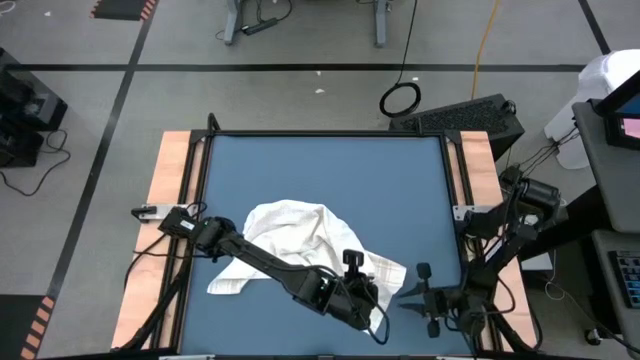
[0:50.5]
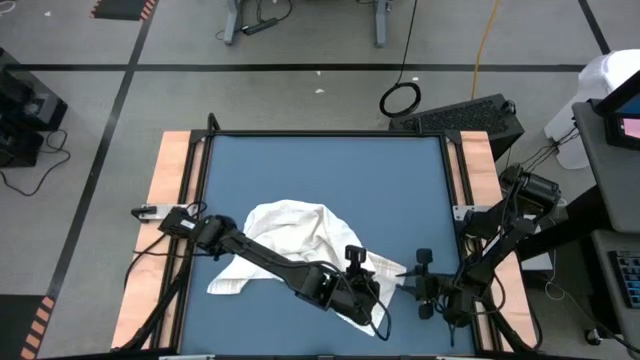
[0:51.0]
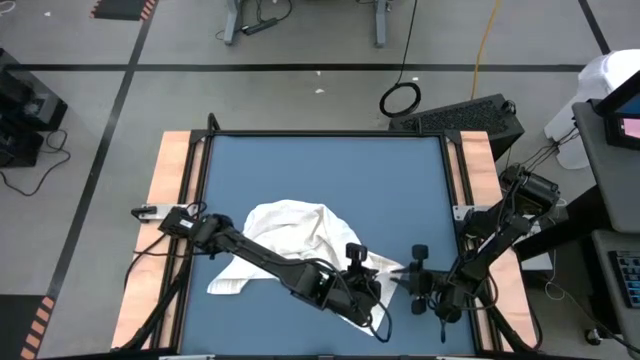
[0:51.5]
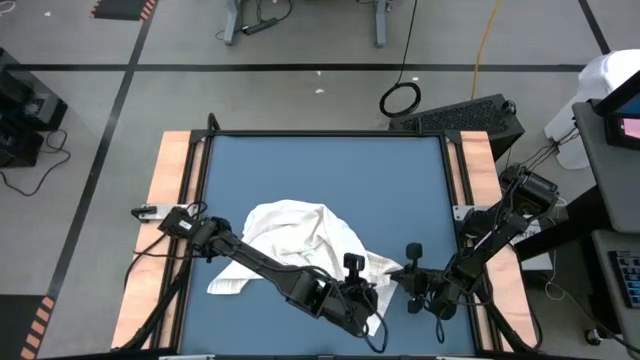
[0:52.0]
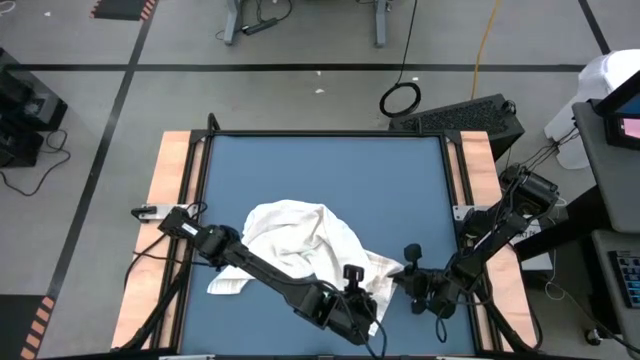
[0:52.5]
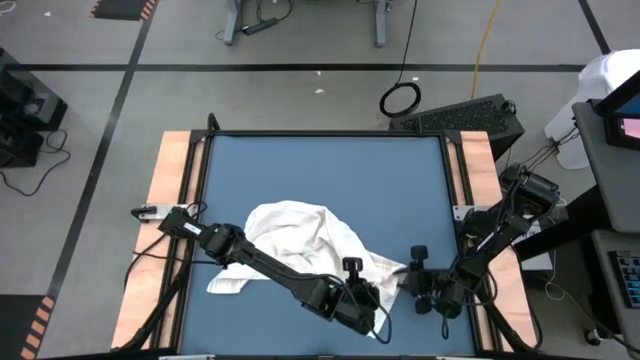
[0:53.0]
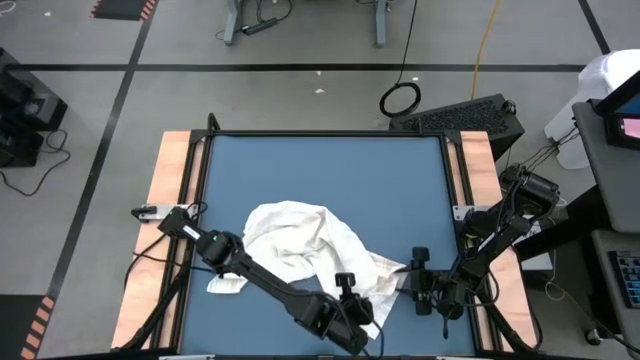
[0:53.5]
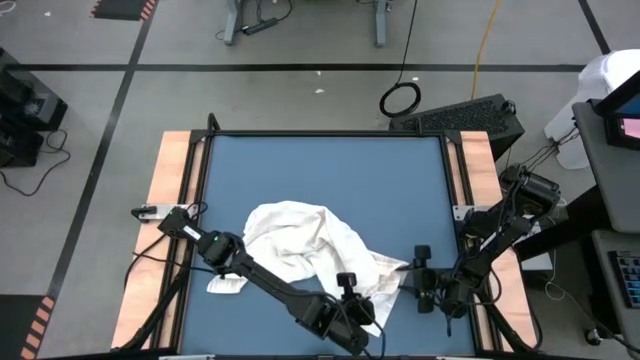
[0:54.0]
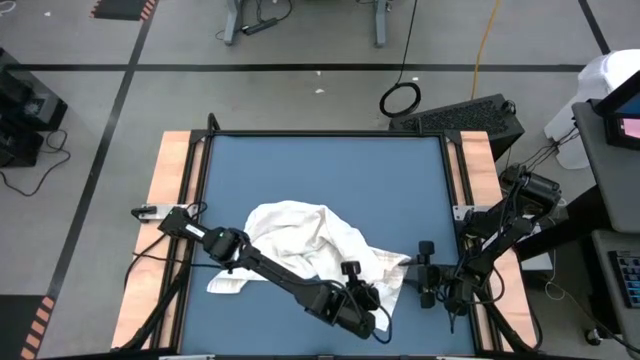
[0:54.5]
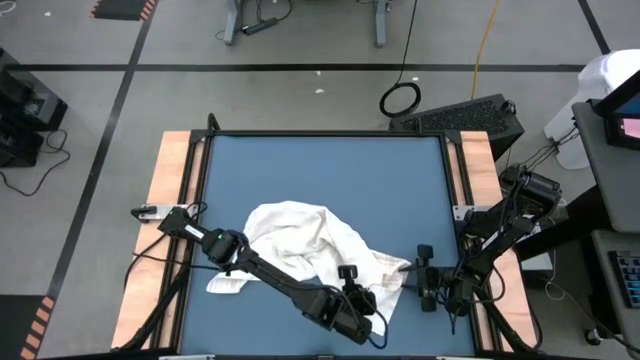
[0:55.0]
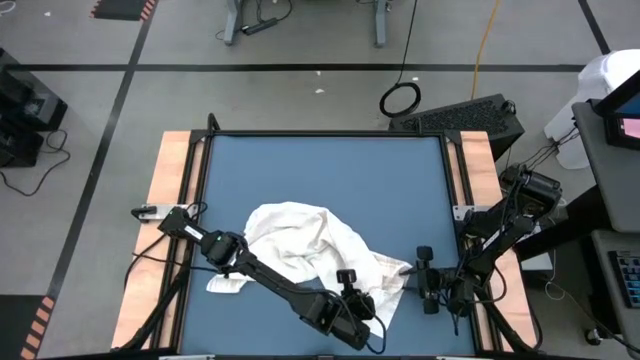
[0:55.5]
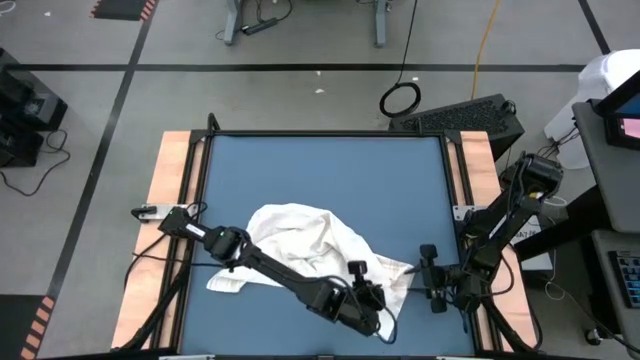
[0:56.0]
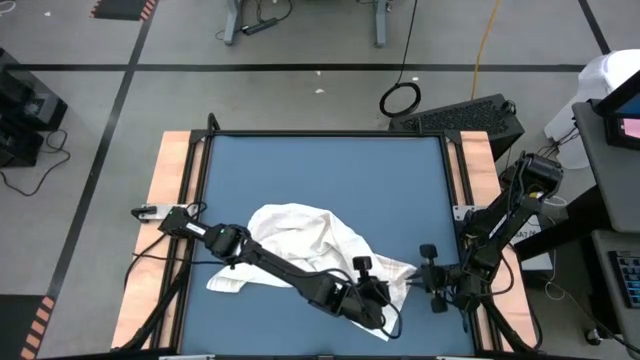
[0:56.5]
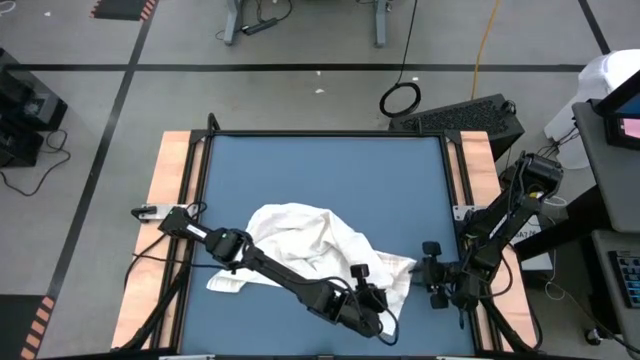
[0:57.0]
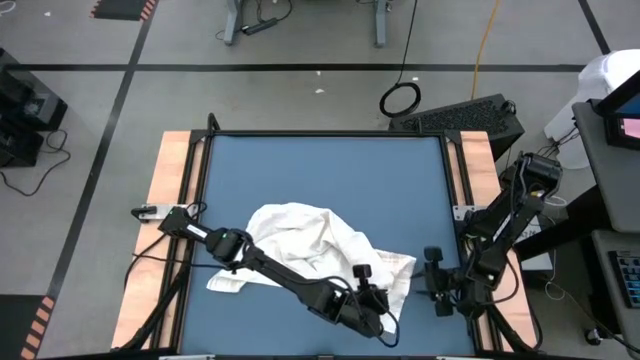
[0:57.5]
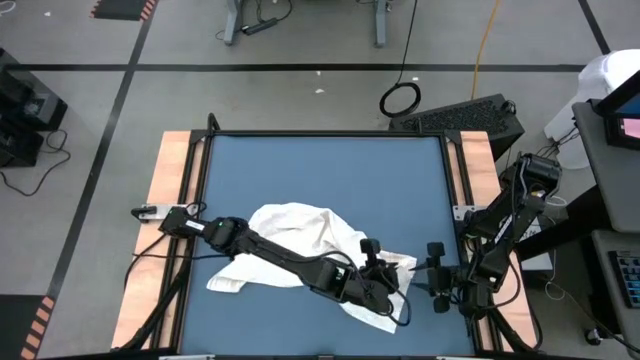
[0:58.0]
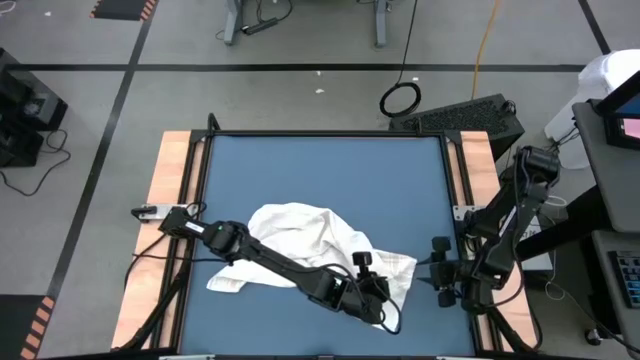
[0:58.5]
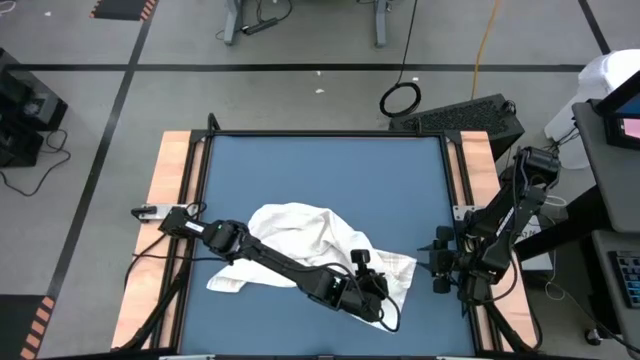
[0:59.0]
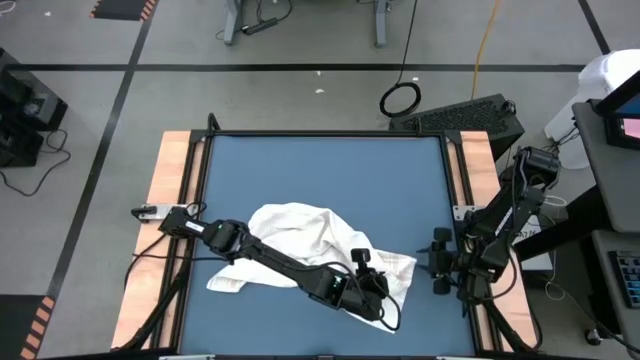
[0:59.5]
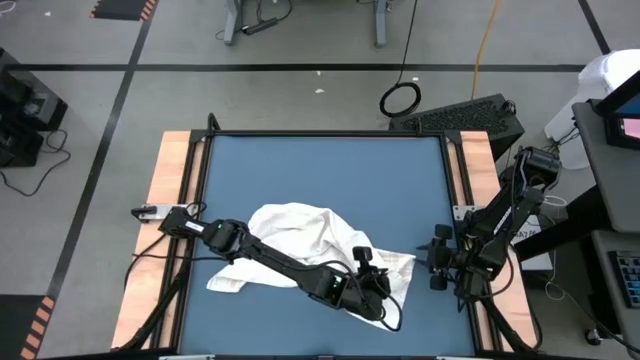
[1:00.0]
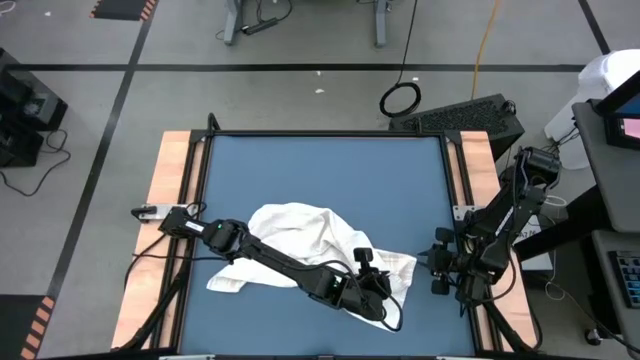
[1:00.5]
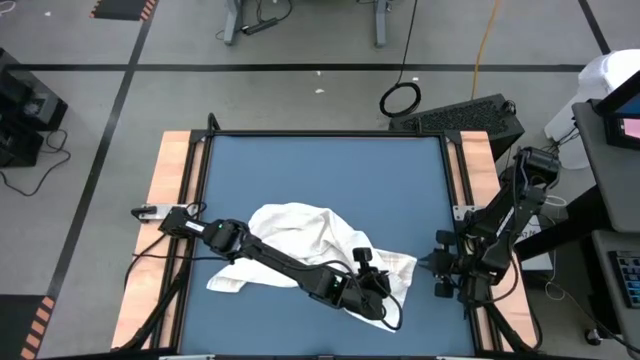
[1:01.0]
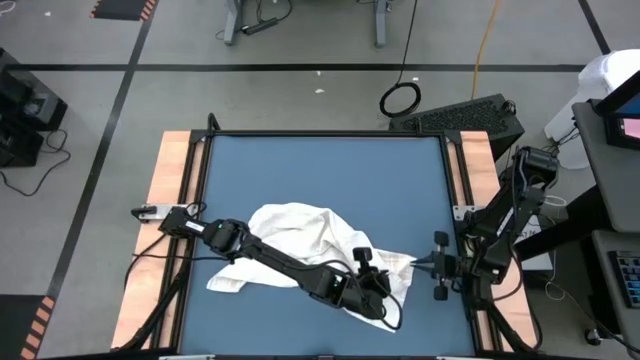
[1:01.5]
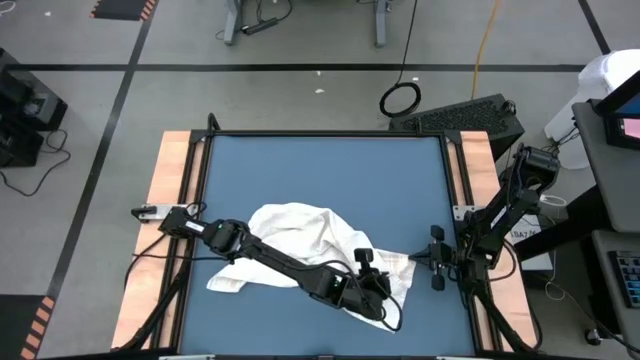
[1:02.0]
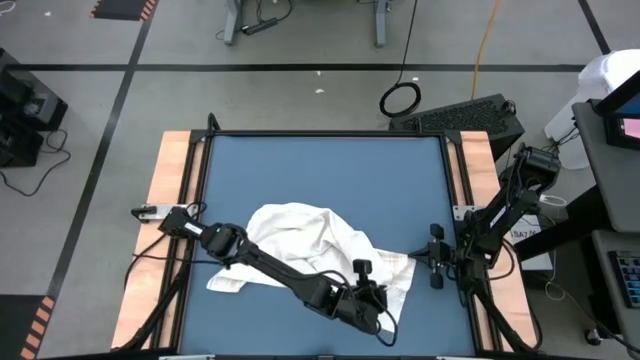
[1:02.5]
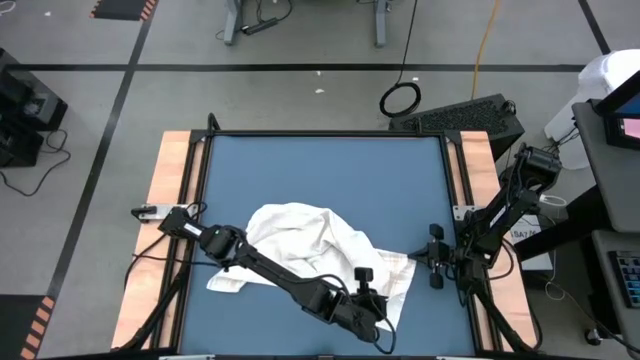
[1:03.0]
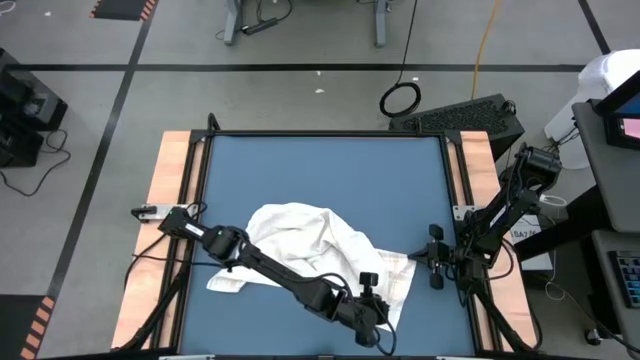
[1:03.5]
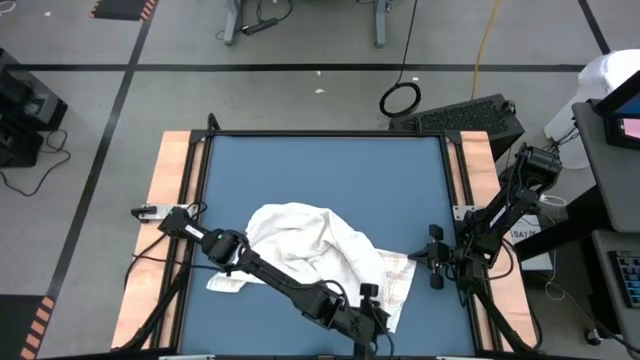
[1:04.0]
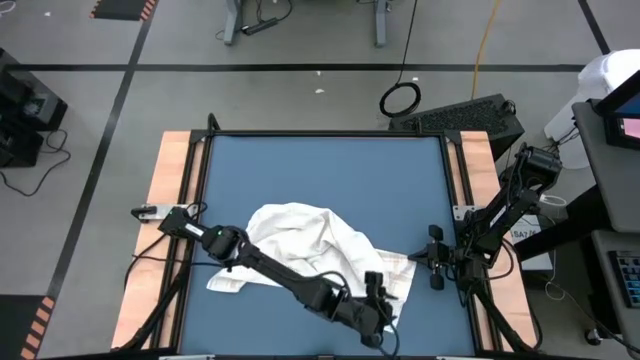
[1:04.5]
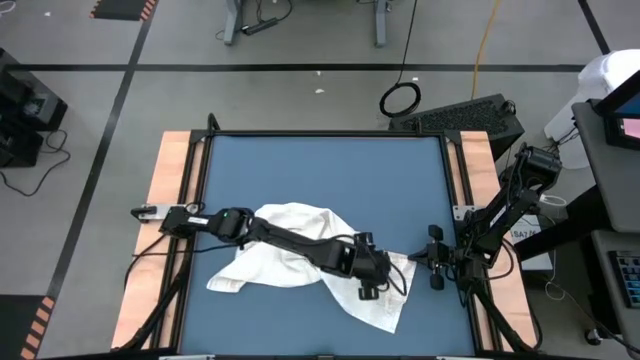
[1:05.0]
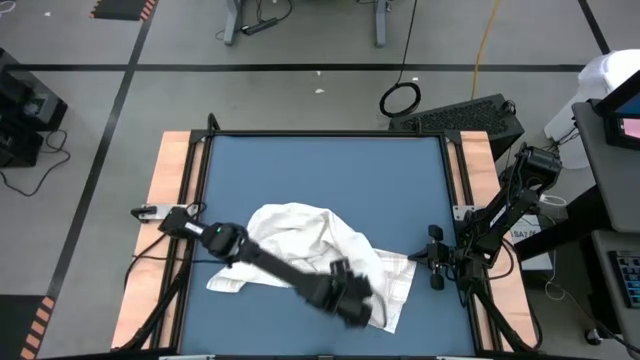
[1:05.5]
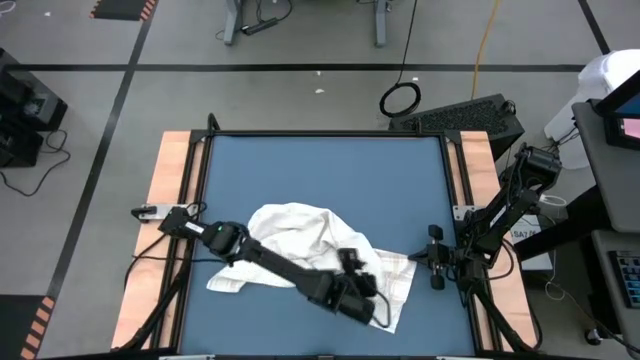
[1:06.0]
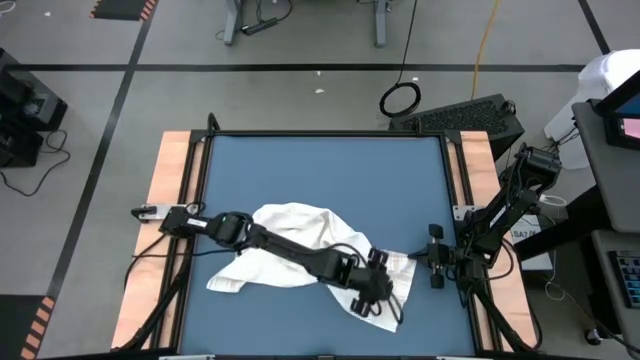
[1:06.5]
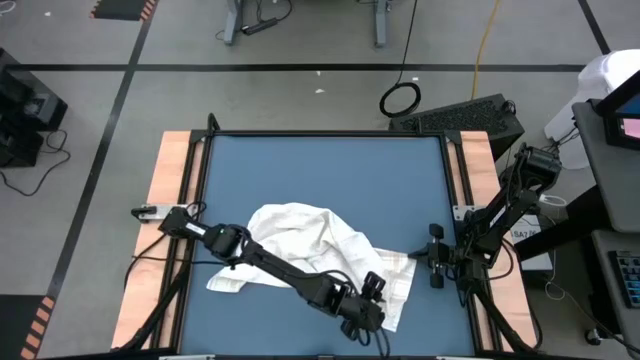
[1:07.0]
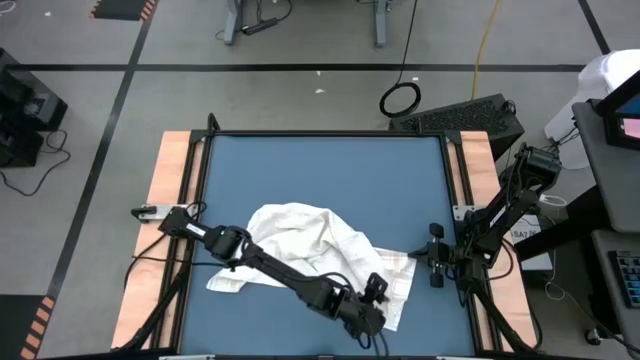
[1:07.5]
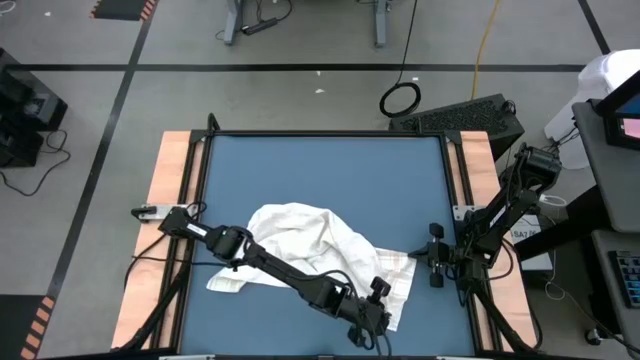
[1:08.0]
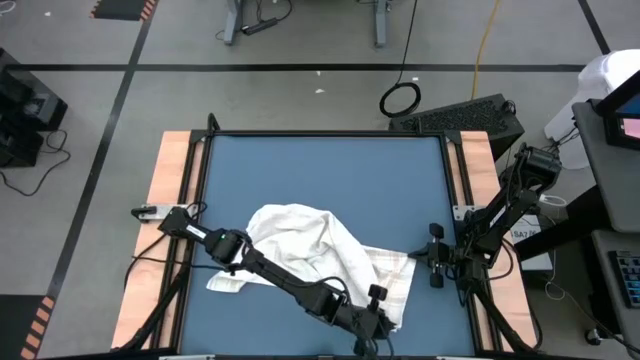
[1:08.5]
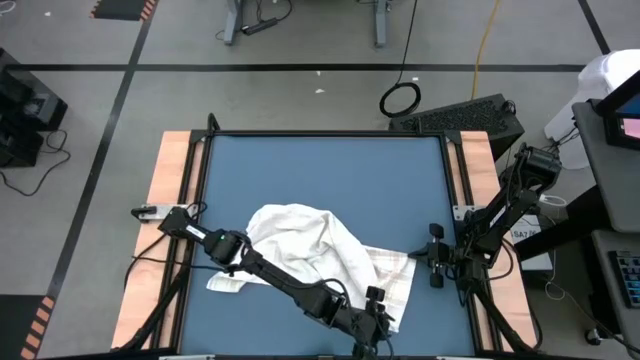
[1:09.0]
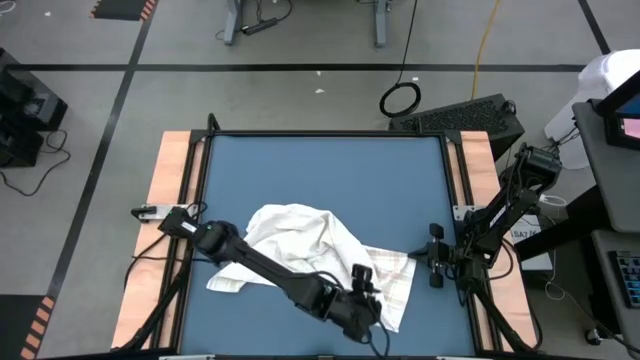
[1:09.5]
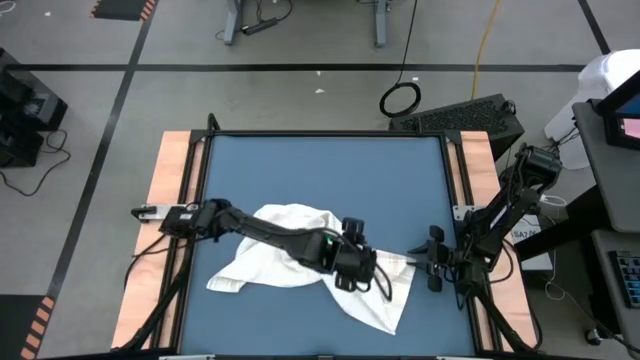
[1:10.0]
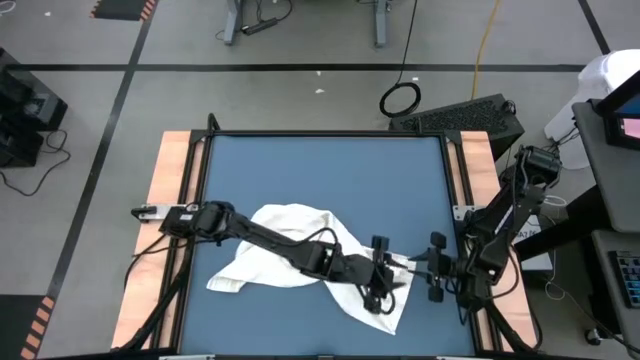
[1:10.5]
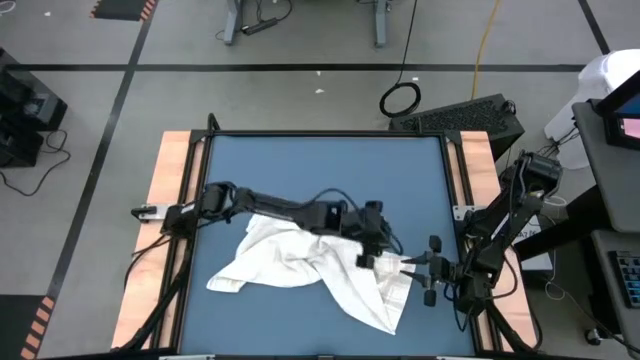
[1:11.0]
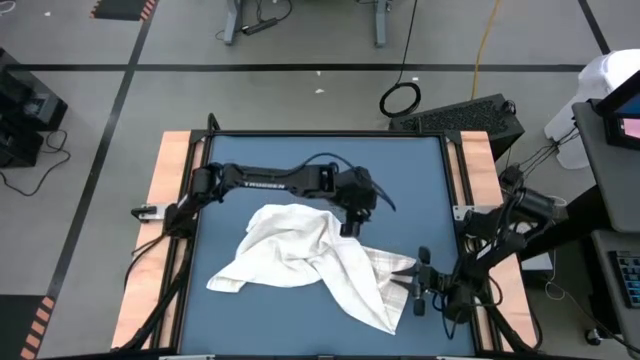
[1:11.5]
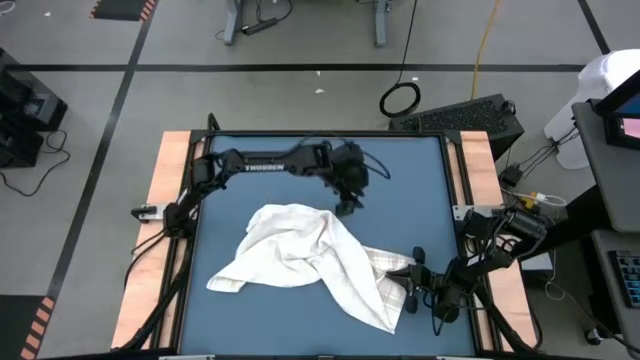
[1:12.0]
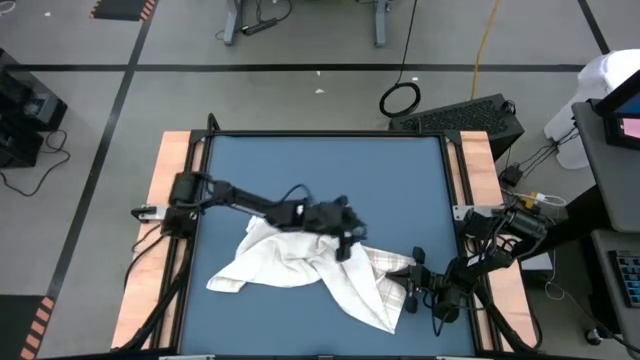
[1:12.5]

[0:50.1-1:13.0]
Task: Roll towel into tight, uniform cylinder
Roll the white towel
